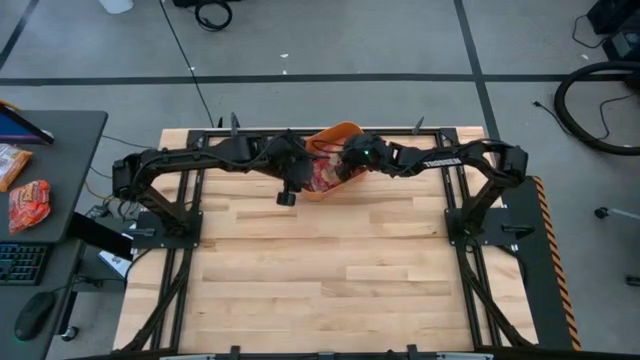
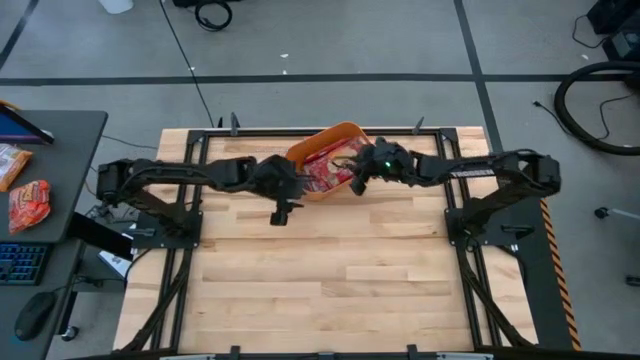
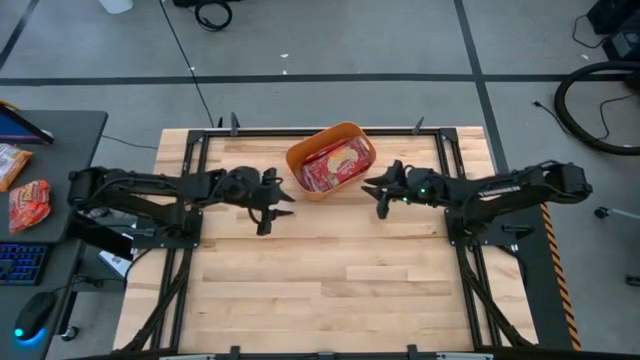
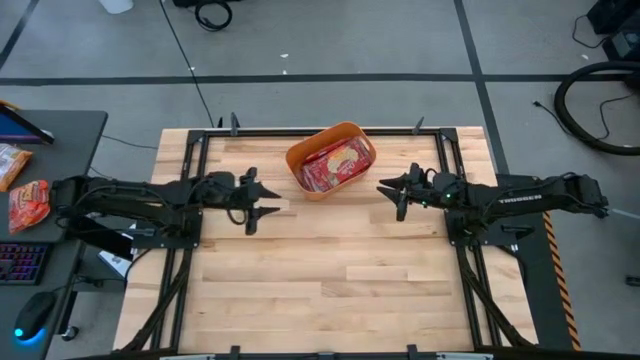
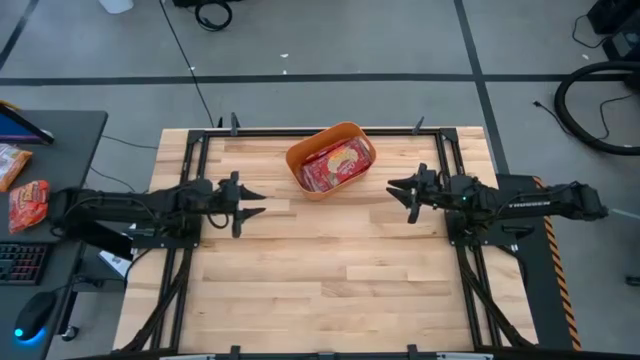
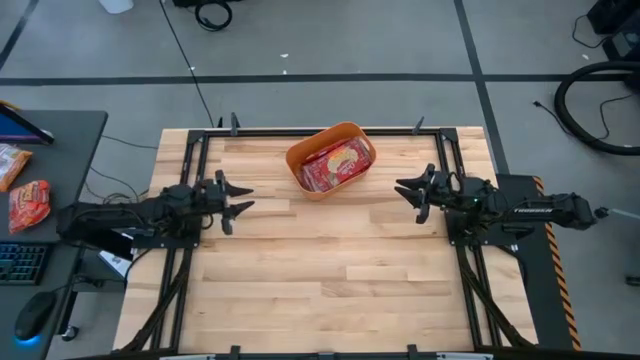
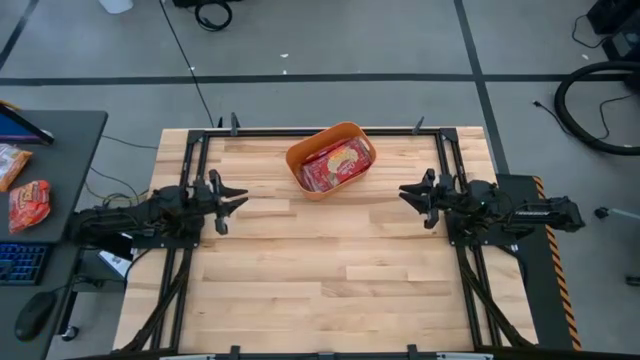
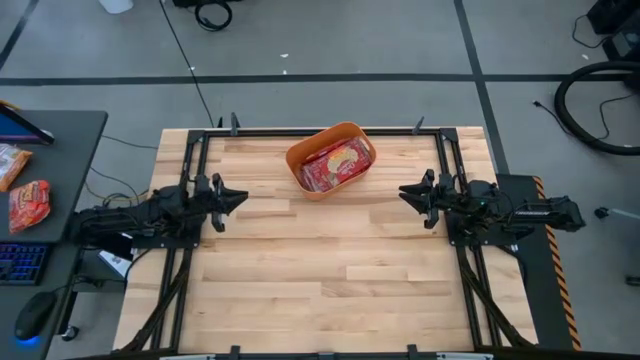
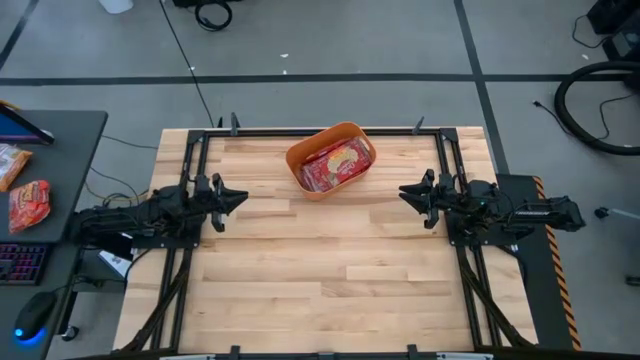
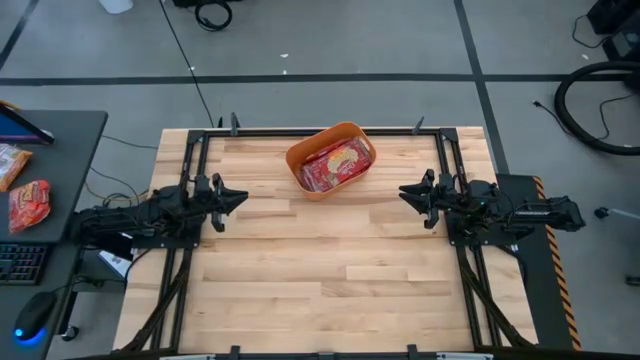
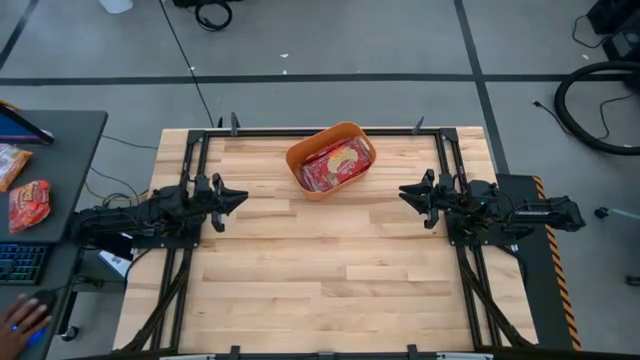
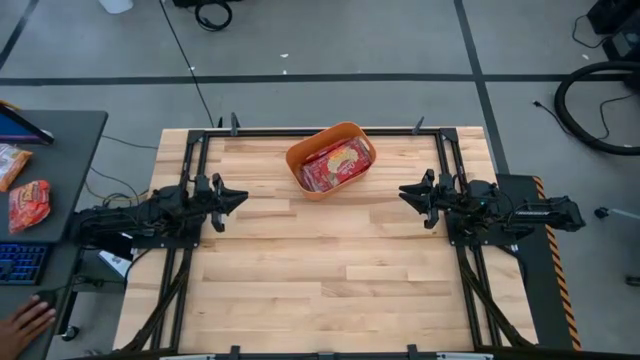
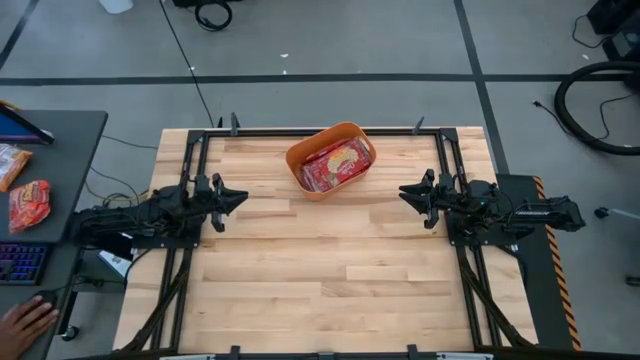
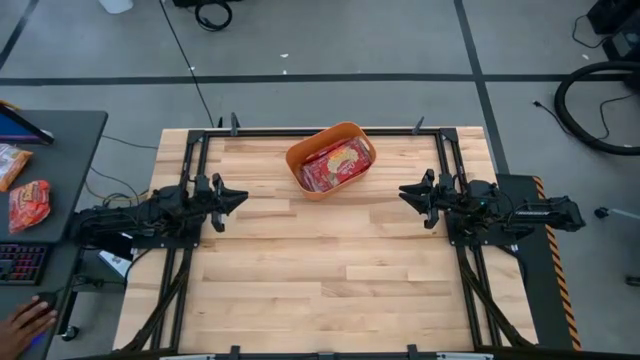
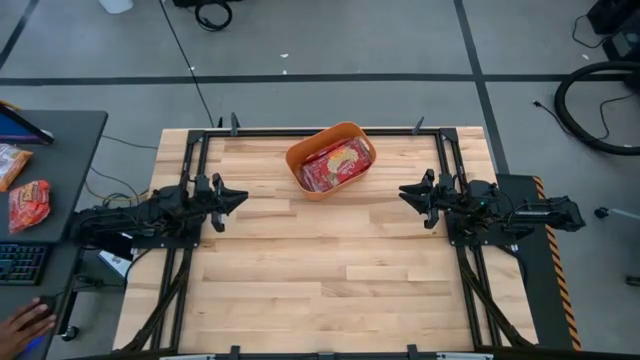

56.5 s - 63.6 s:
Task: Sort popcorn bags into baskets
Return to Home Position

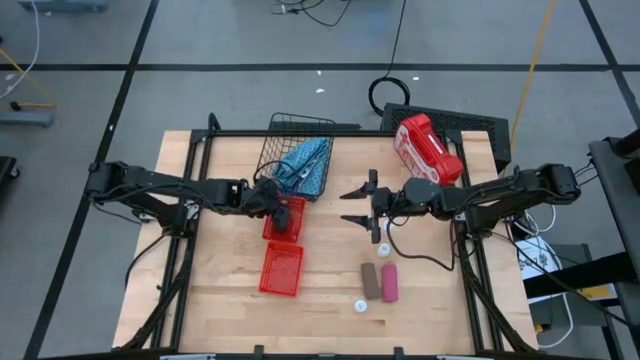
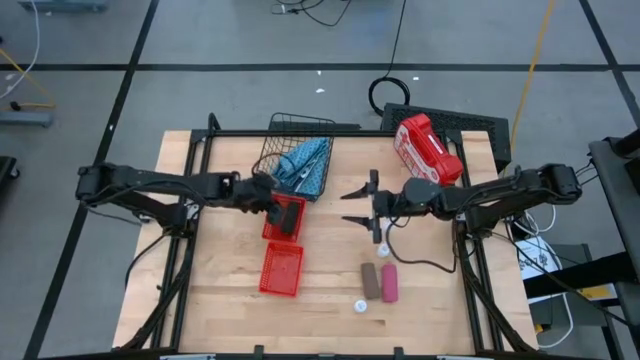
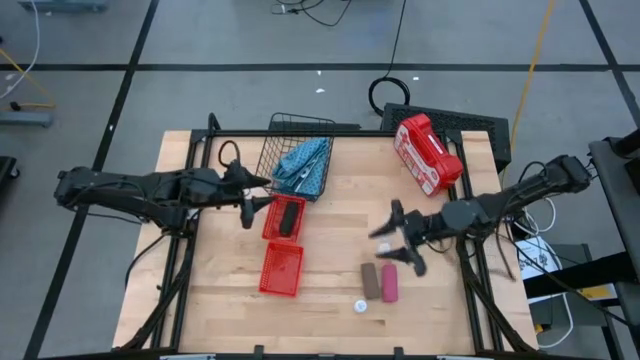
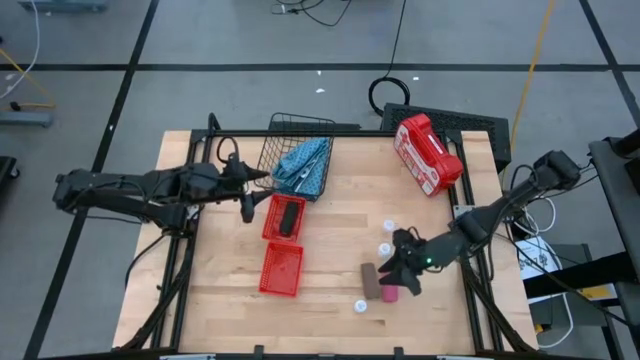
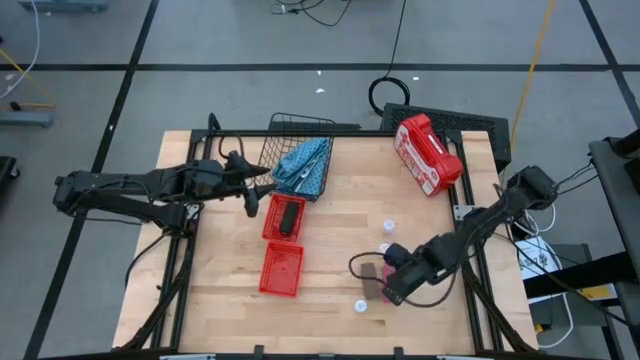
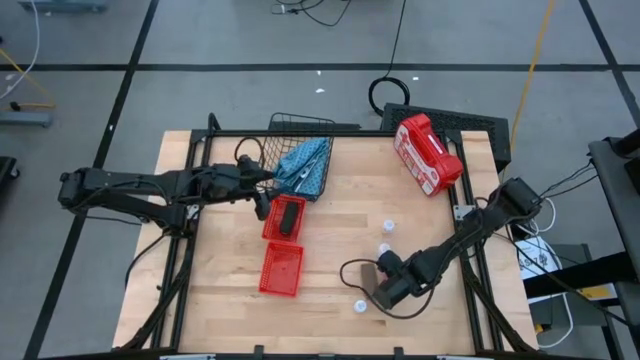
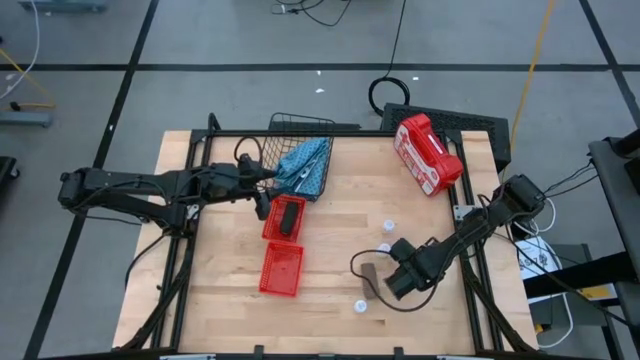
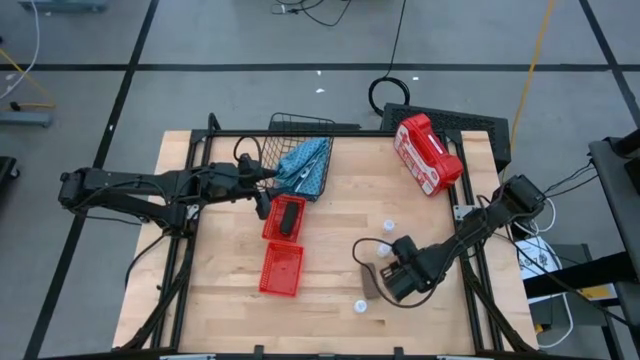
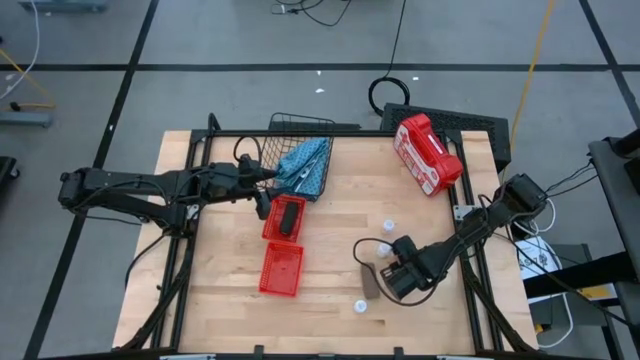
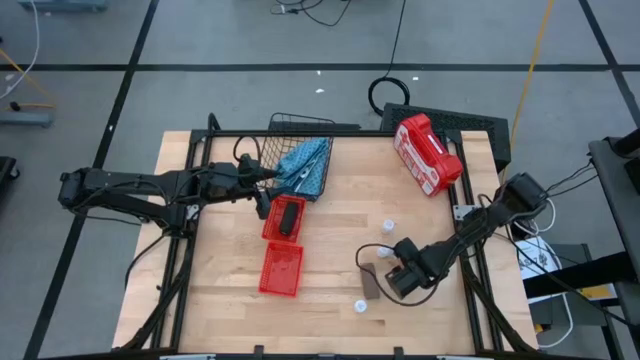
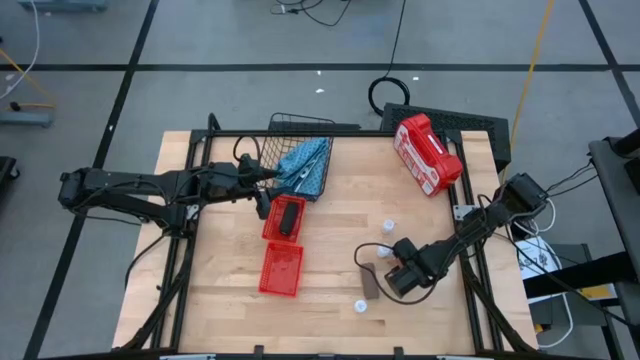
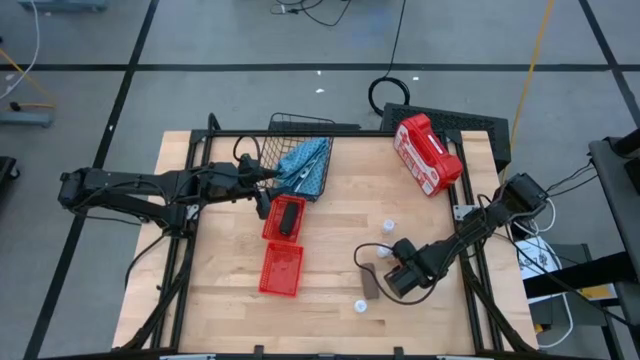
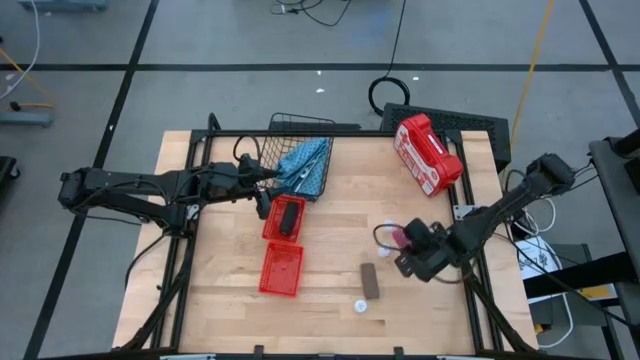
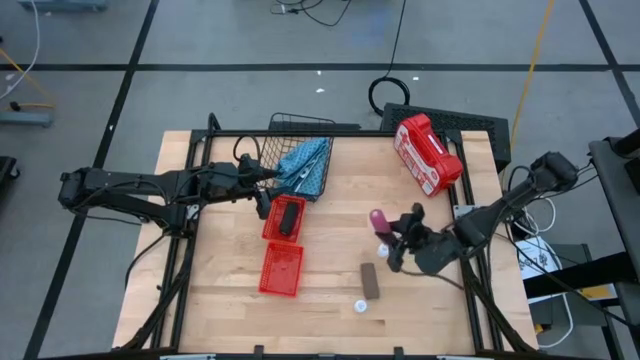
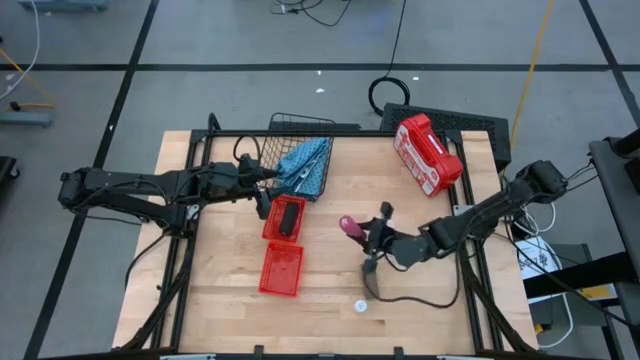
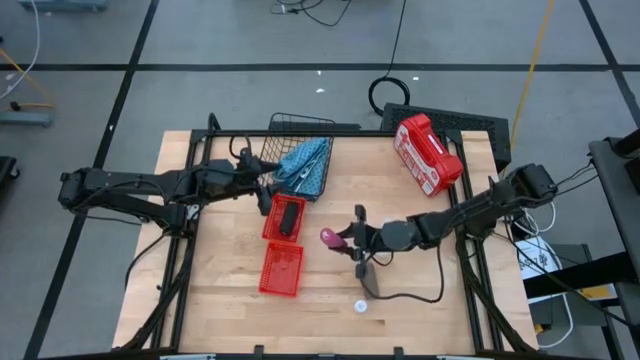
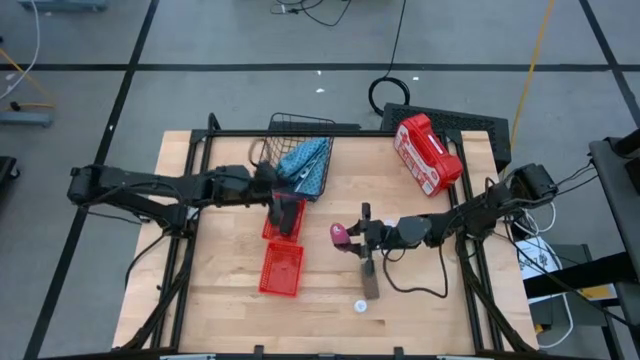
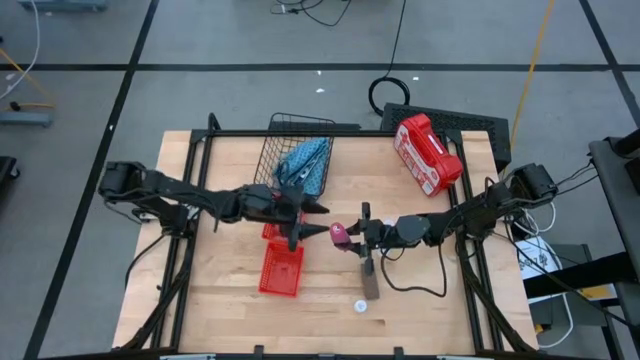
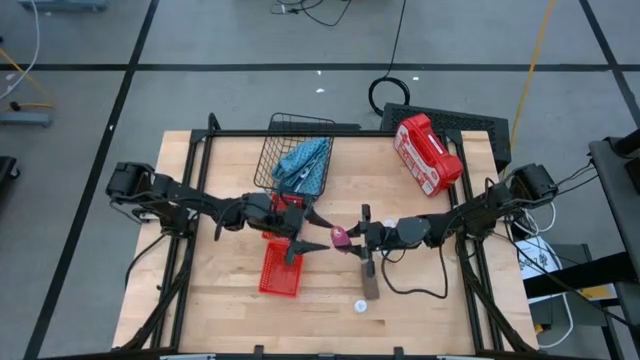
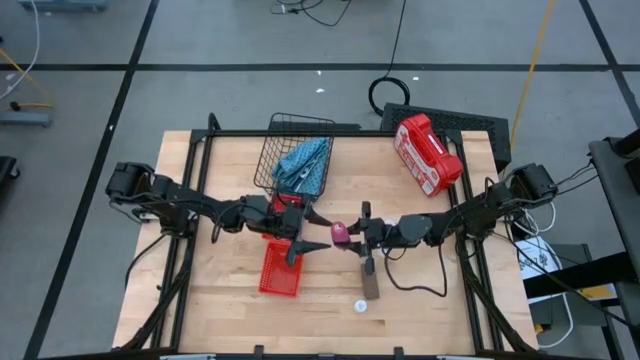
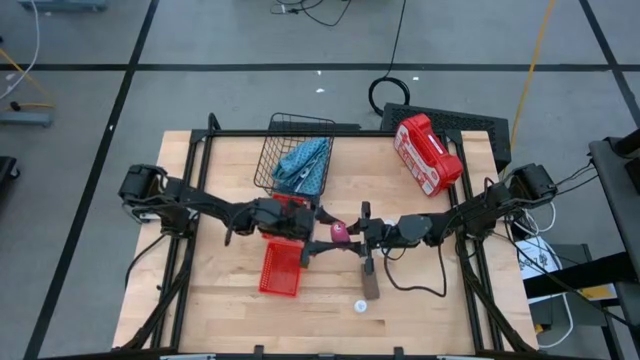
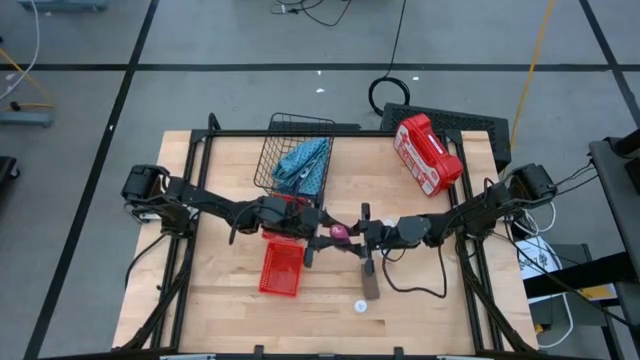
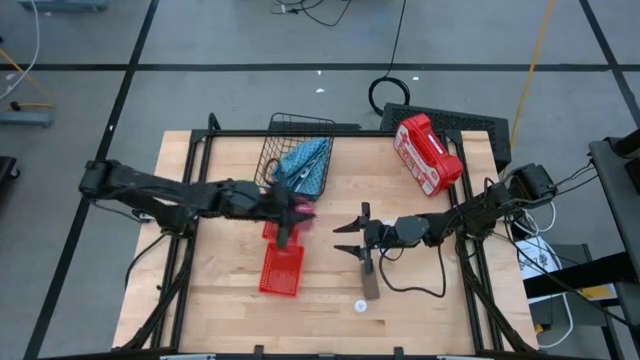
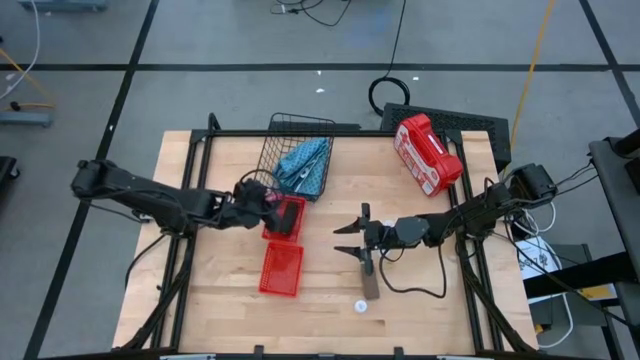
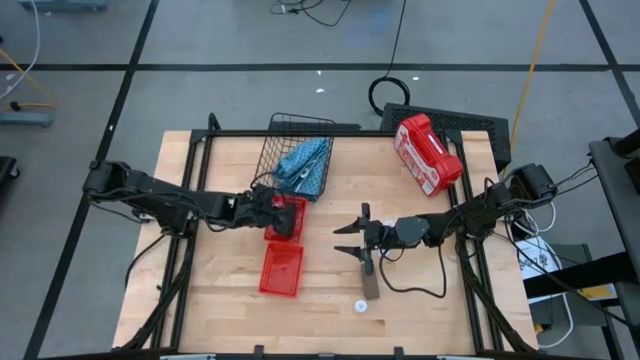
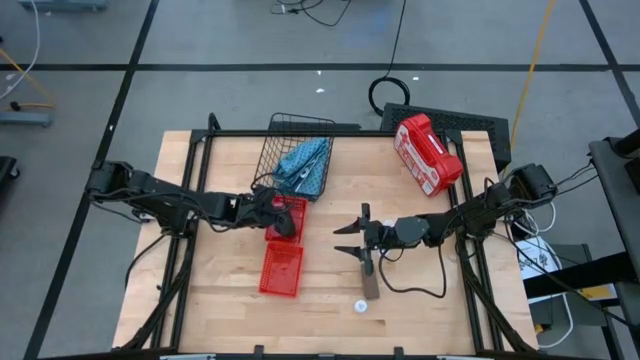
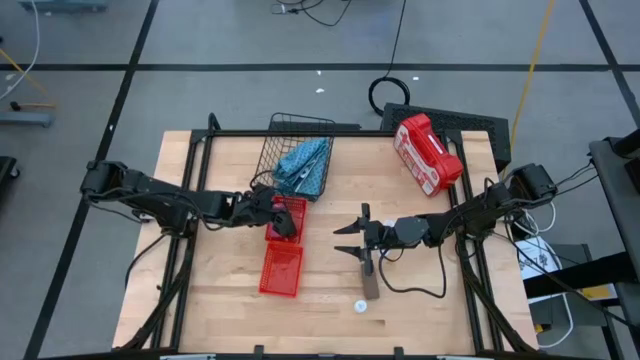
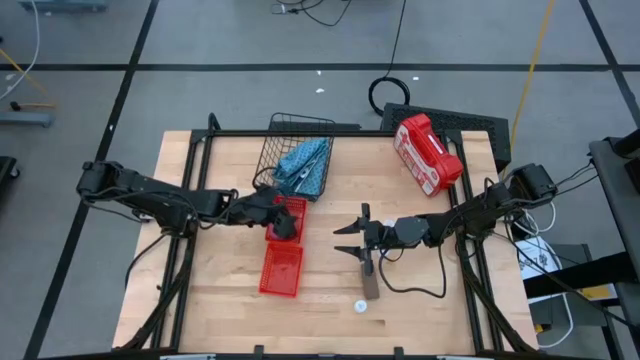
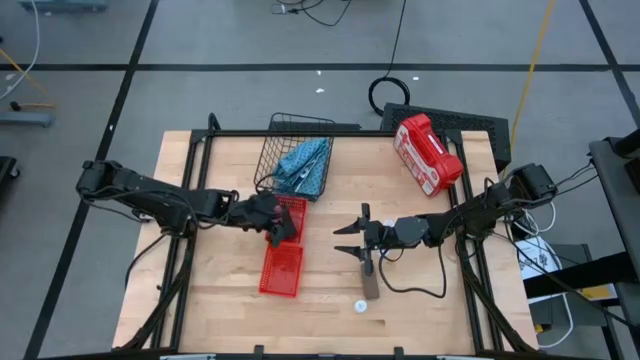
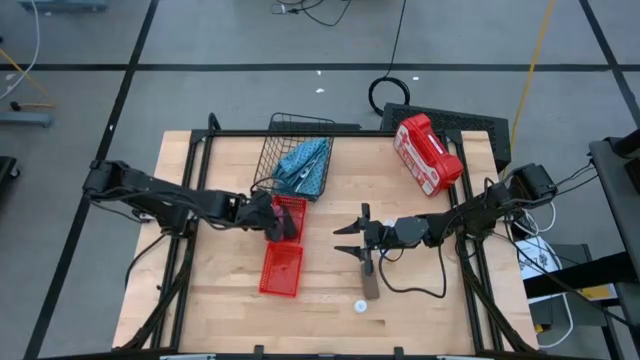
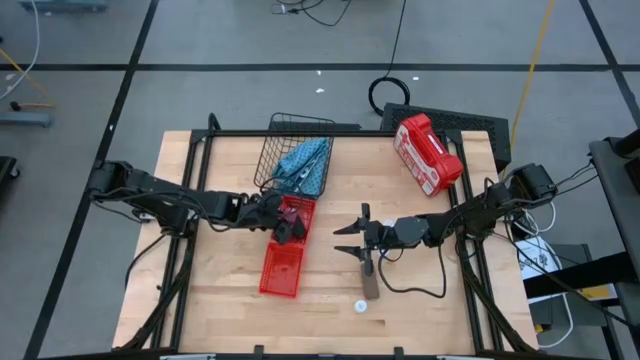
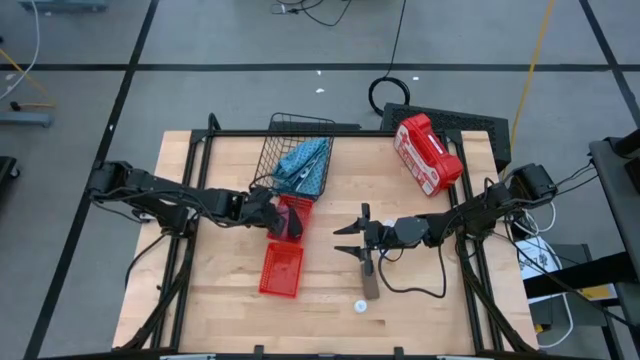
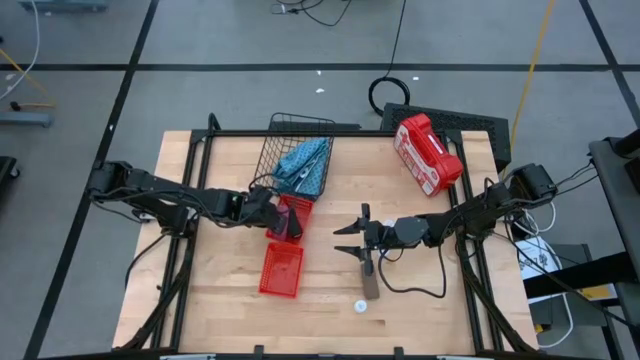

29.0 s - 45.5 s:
Task: Pick & place medical supplies in basket/bin
Put the pink bandage into the top red bin
